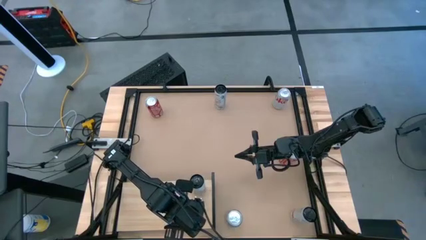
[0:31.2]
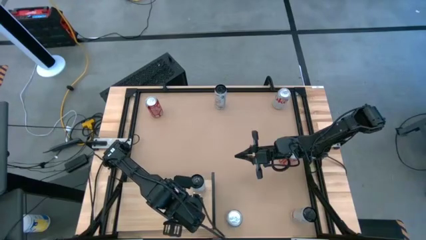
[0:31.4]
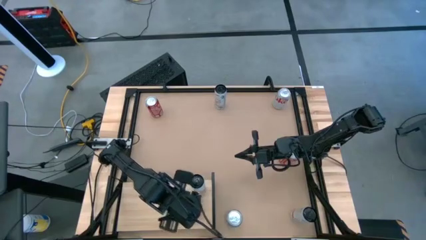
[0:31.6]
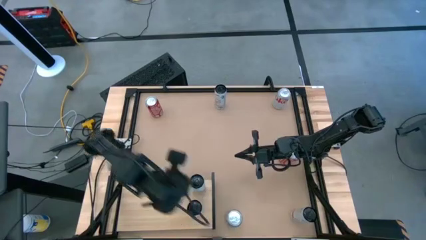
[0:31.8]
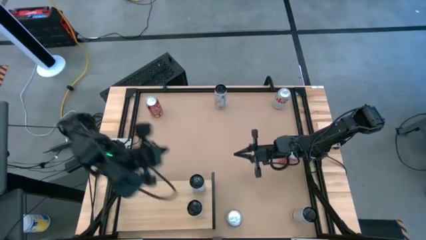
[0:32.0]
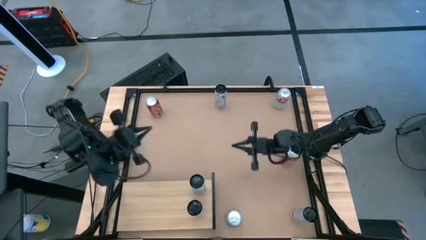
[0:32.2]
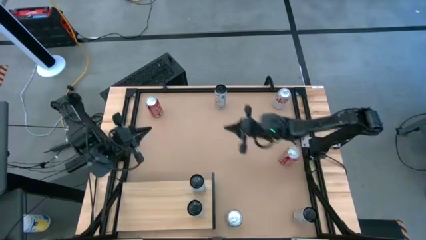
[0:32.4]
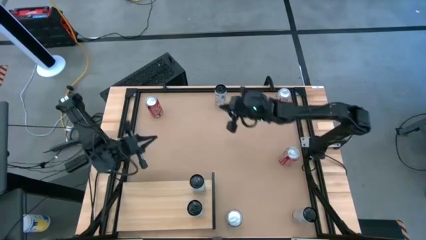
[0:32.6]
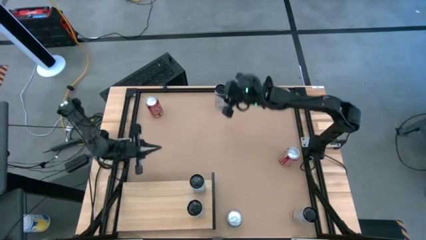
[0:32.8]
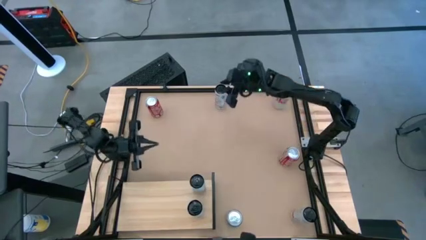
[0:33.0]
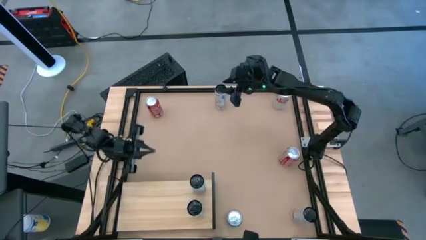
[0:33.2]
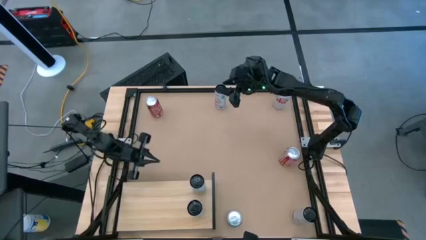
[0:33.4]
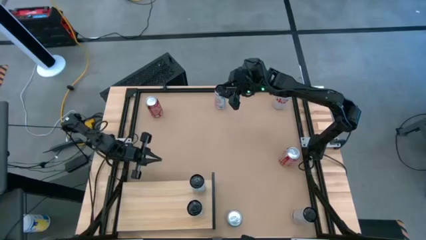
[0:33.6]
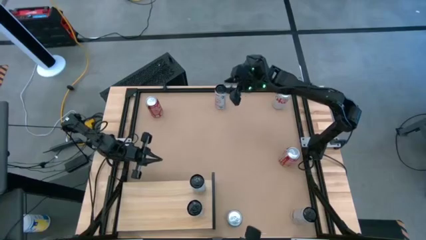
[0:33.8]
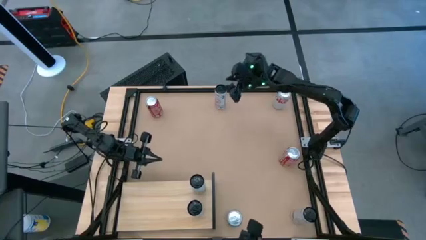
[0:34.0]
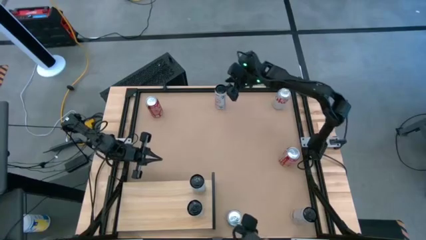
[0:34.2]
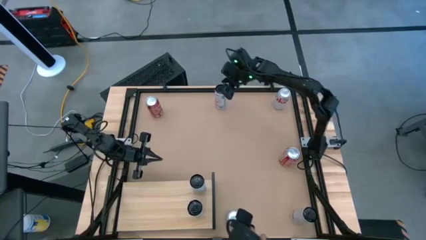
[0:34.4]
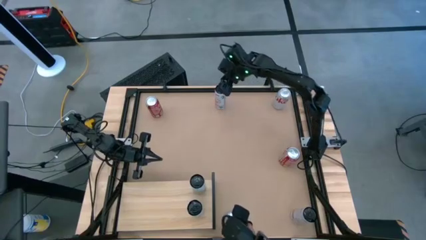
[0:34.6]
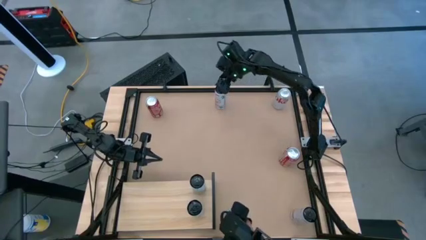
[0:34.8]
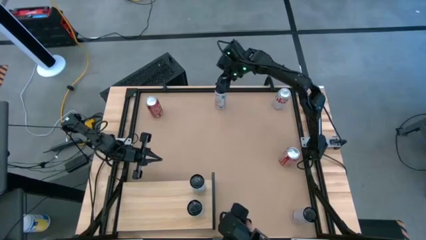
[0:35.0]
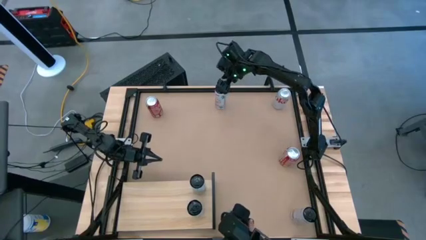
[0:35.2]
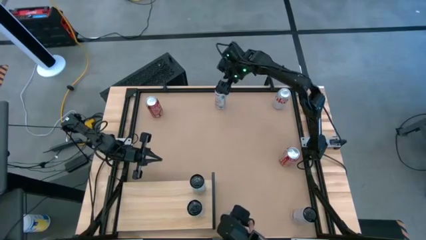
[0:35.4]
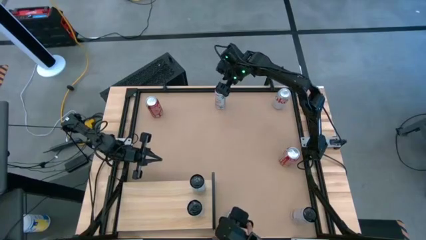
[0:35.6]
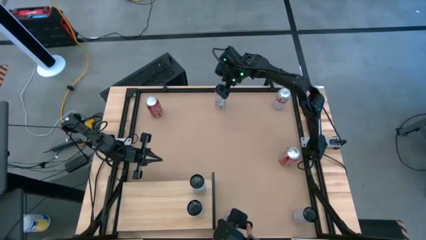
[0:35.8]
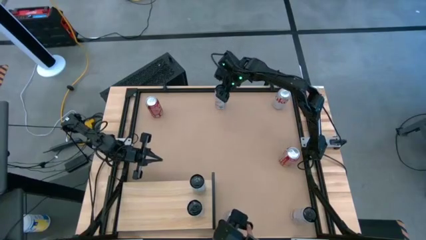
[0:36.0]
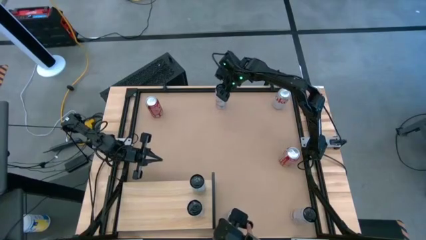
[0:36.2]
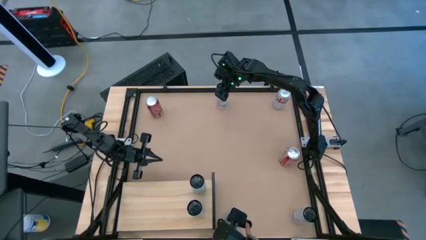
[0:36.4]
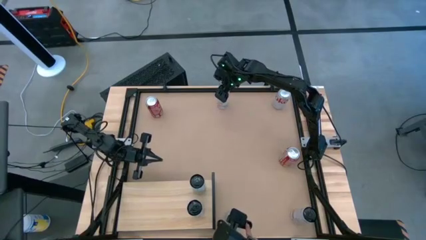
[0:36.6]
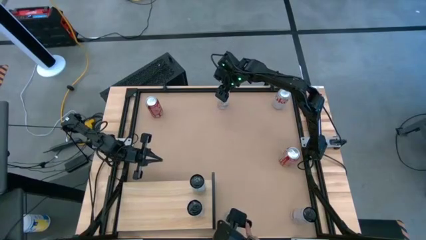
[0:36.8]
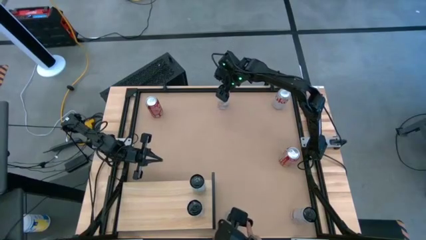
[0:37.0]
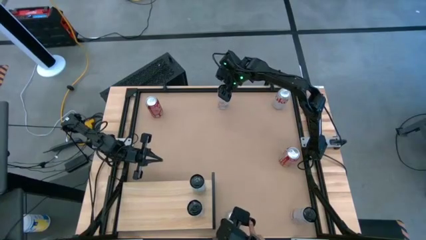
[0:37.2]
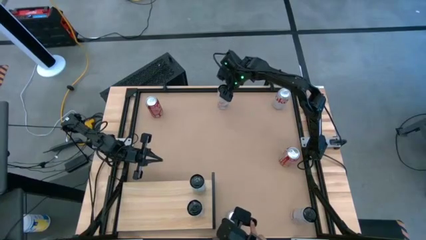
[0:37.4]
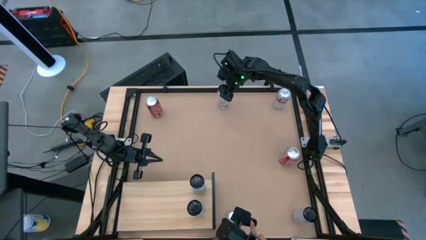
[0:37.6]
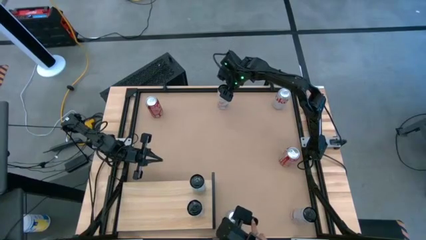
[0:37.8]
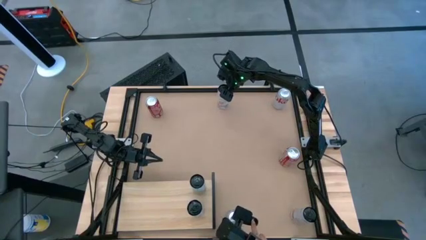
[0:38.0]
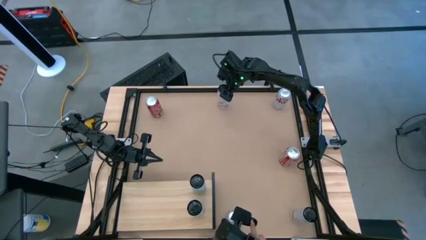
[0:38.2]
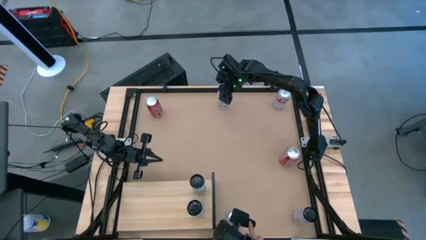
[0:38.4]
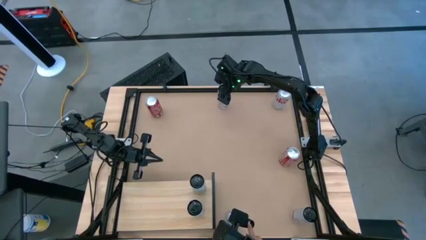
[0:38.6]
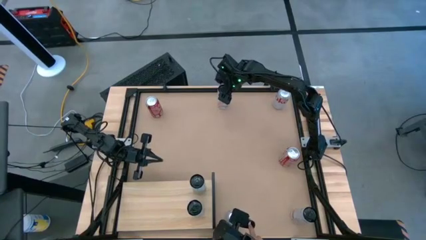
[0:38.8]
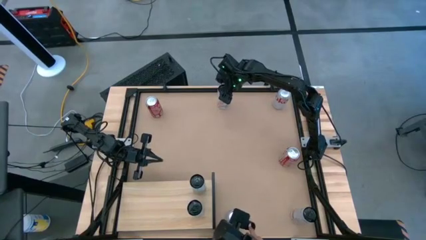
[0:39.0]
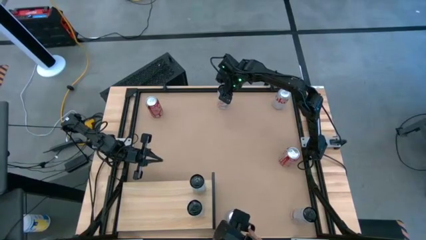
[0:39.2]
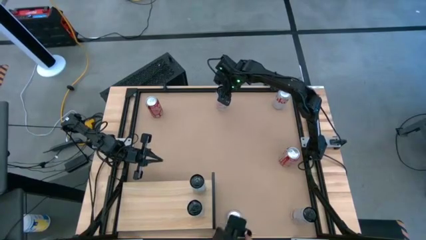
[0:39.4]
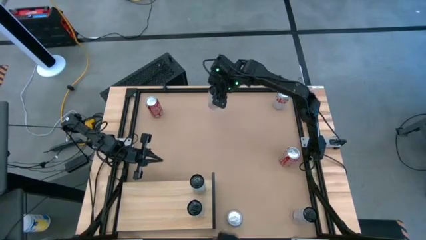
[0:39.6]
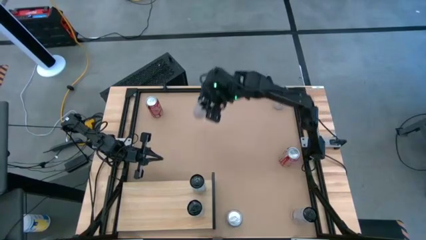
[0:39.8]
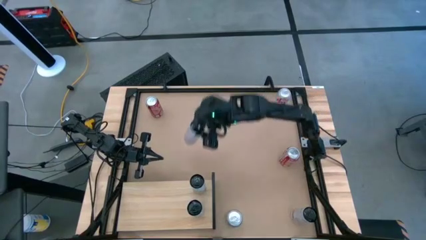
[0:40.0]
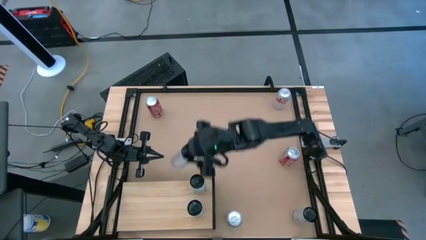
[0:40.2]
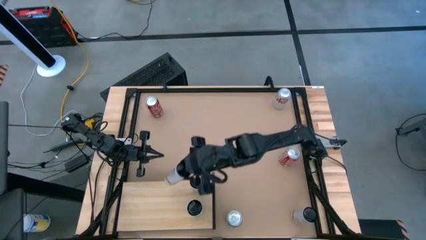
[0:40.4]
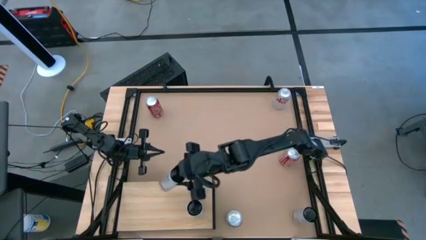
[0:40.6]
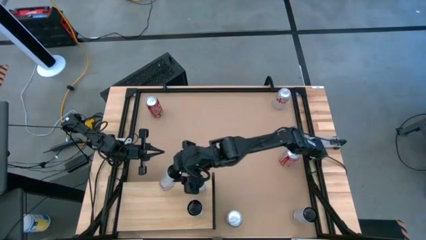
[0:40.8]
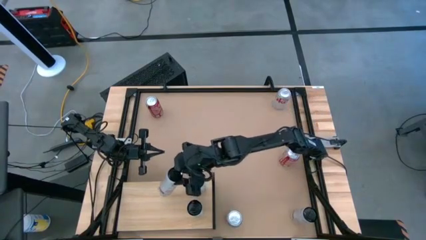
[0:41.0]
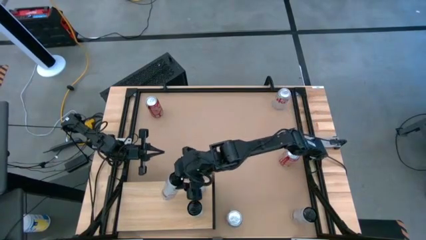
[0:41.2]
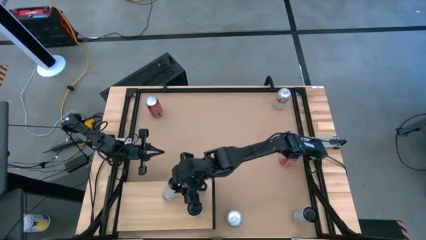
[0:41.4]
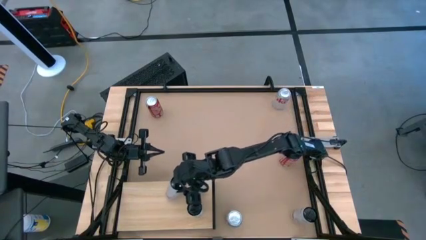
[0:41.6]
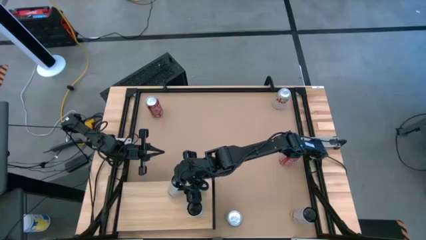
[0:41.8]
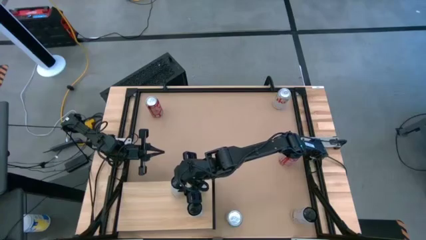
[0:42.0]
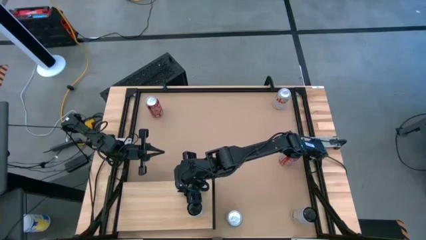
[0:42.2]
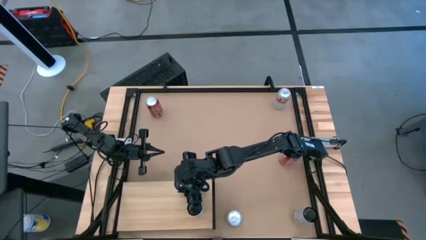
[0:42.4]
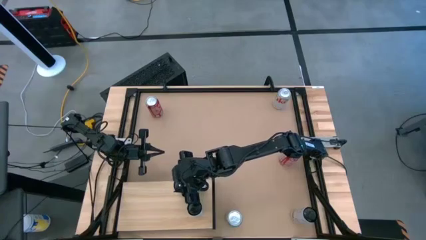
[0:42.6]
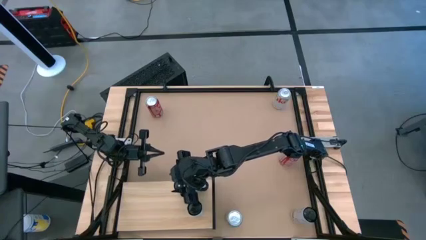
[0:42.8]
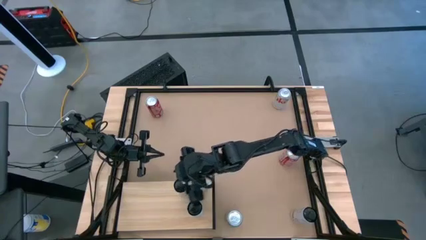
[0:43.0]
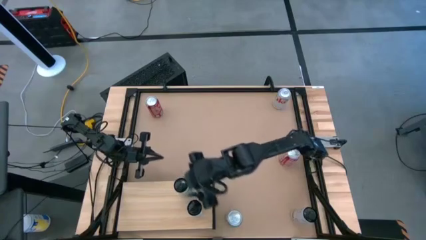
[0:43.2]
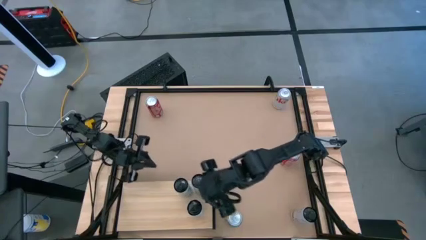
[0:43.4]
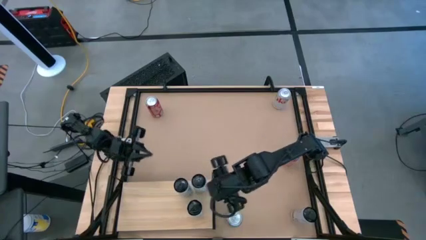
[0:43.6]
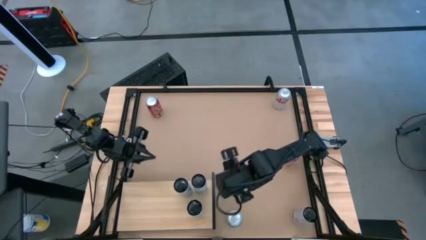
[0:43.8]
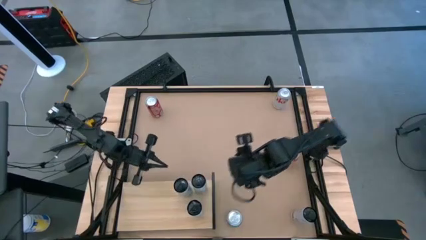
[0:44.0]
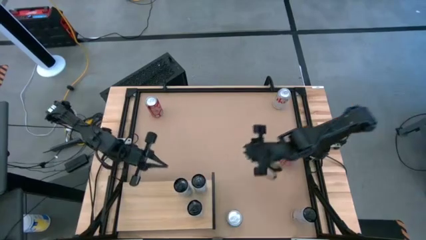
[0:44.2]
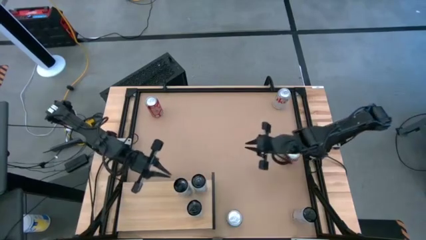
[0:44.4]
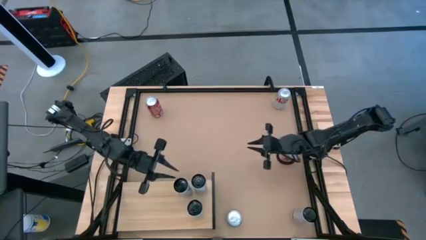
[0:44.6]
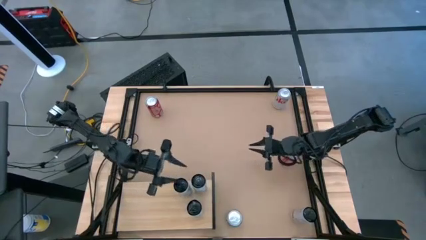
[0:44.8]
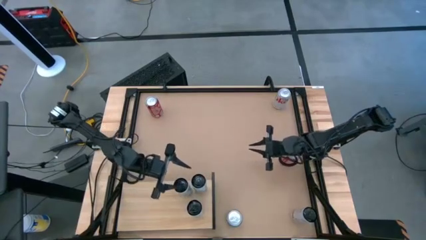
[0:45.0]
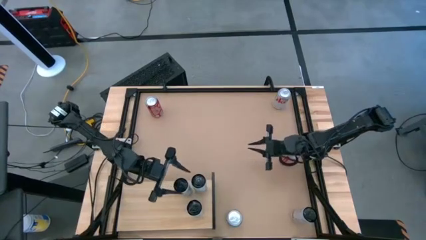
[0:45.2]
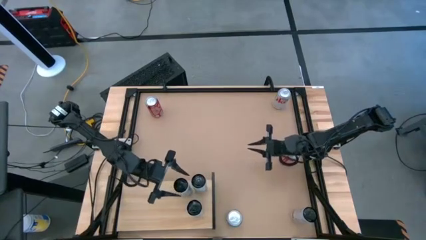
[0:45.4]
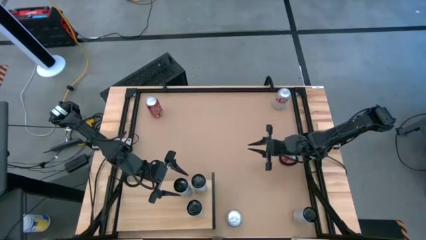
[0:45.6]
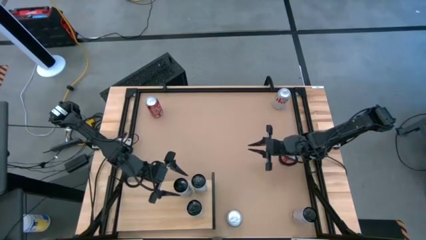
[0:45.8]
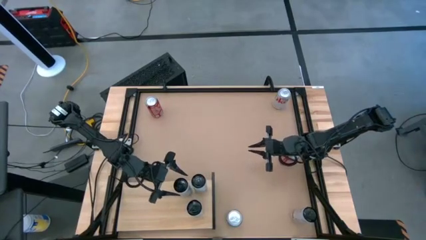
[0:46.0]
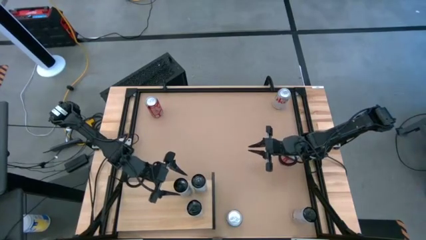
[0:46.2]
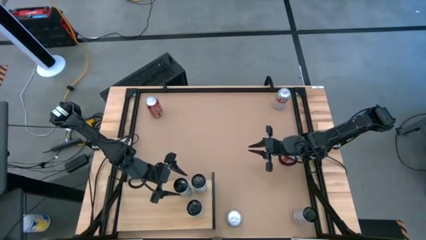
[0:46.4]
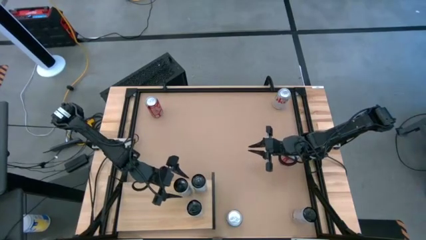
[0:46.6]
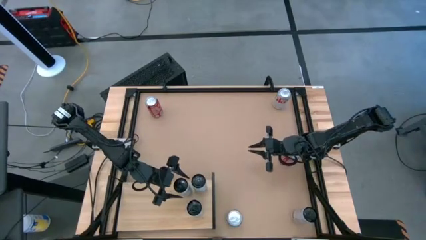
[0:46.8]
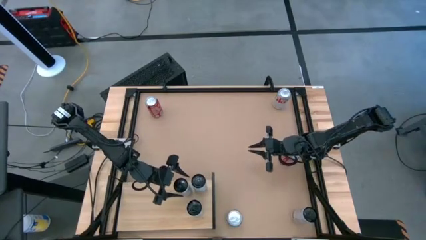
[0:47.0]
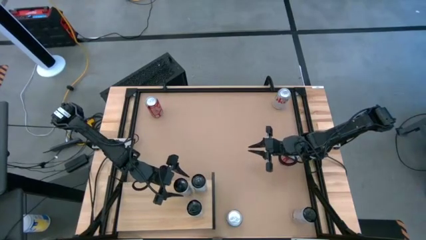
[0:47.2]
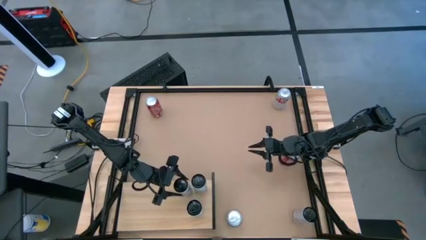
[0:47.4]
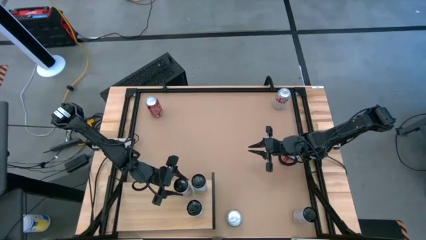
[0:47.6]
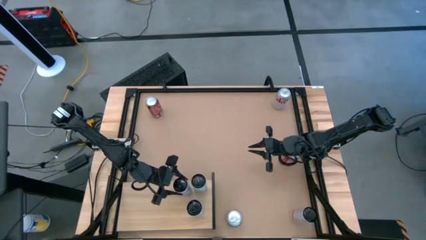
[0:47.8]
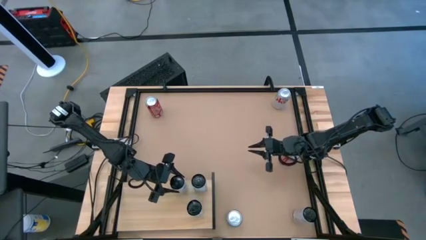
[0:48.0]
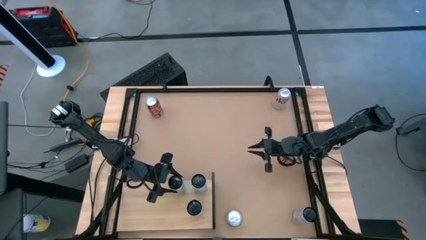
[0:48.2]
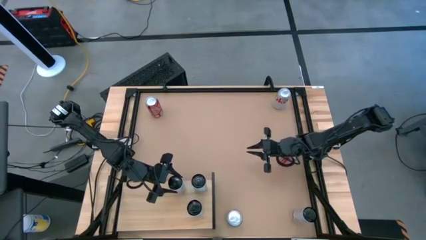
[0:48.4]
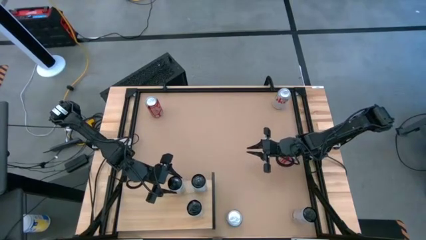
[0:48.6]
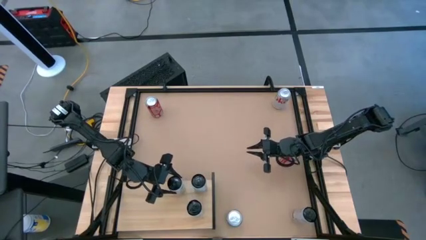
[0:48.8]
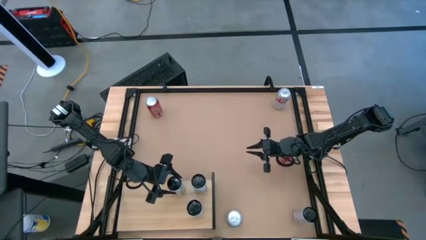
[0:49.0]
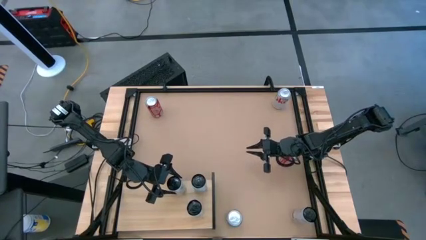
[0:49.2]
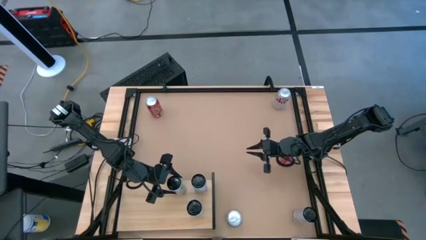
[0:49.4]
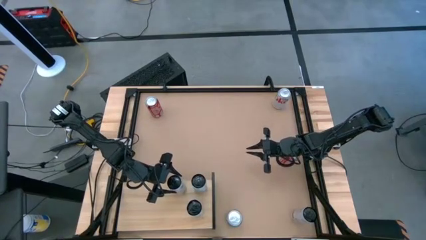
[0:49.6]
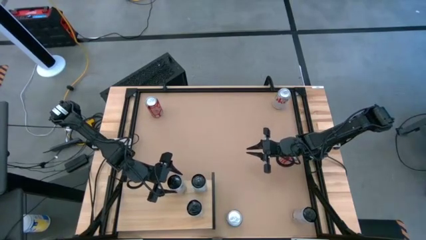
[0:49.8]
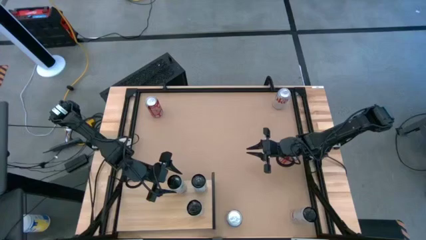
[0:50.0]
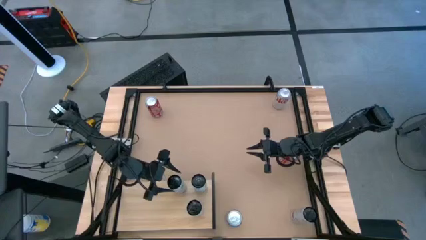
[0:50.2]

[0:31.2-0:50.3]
Task: Place canned beverage on shelf
Put the top white and pink soda can on the shelf
